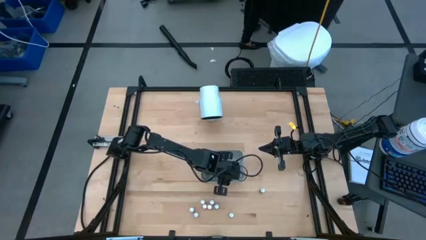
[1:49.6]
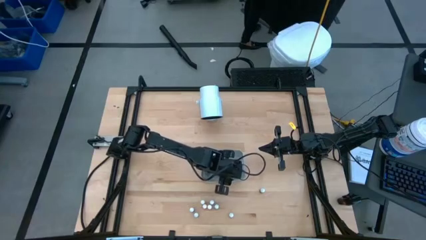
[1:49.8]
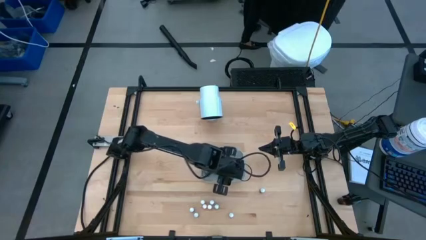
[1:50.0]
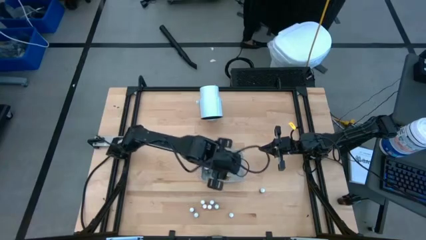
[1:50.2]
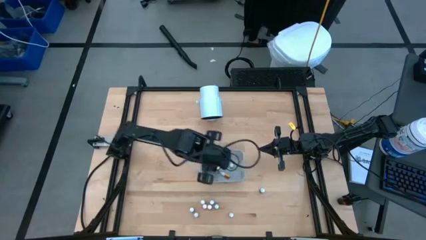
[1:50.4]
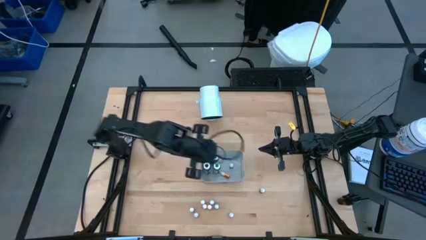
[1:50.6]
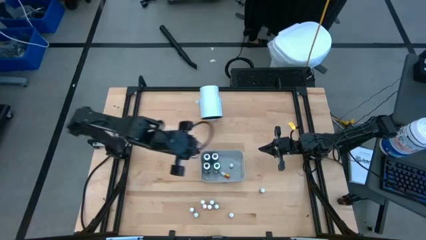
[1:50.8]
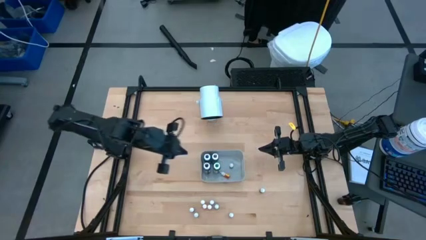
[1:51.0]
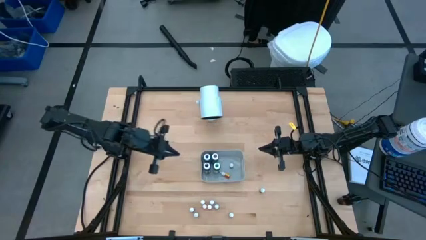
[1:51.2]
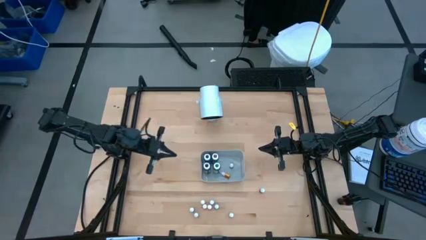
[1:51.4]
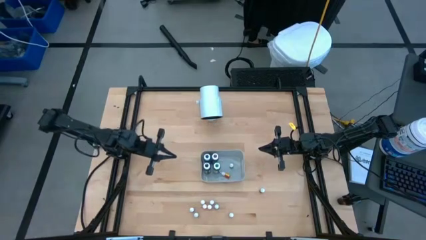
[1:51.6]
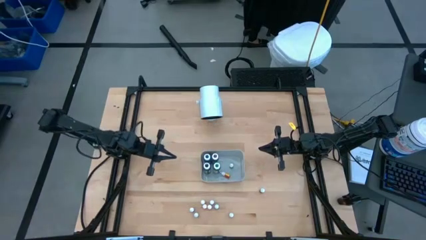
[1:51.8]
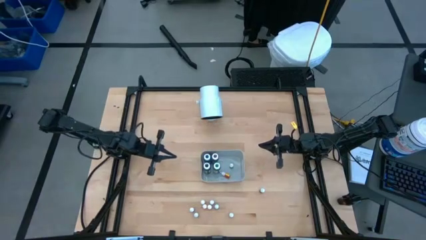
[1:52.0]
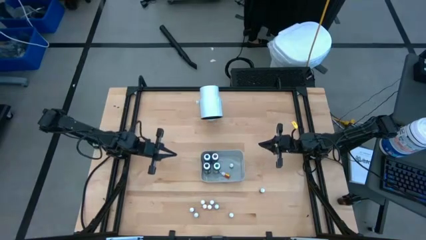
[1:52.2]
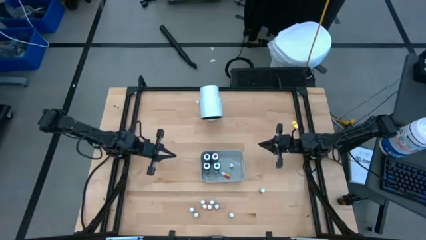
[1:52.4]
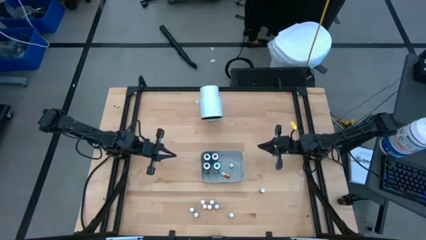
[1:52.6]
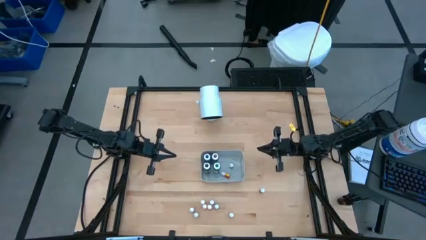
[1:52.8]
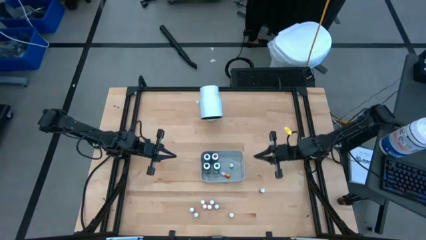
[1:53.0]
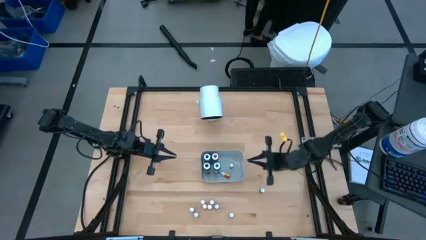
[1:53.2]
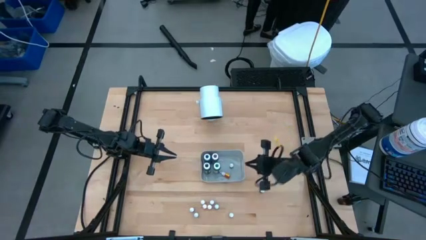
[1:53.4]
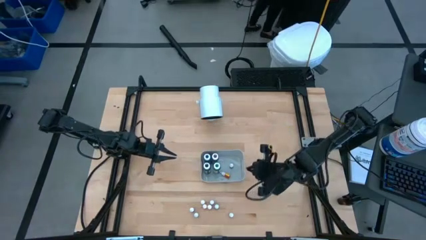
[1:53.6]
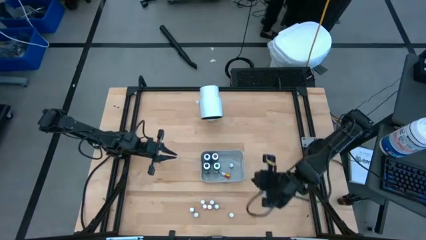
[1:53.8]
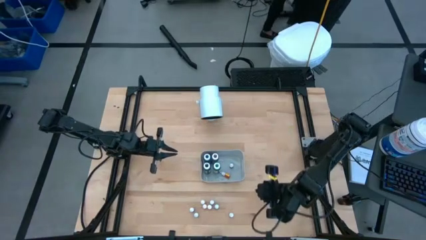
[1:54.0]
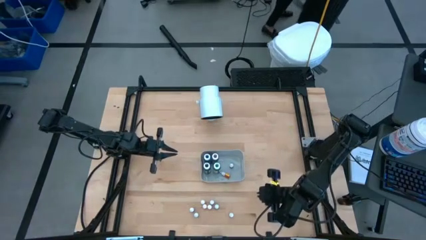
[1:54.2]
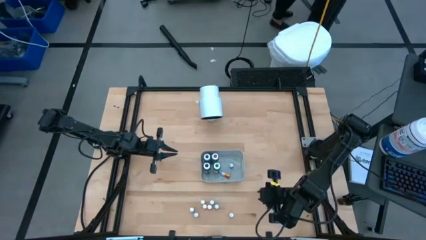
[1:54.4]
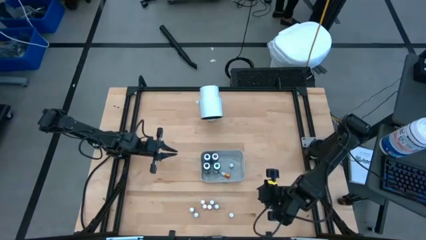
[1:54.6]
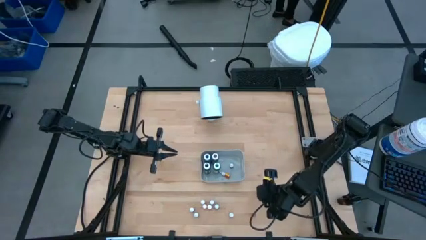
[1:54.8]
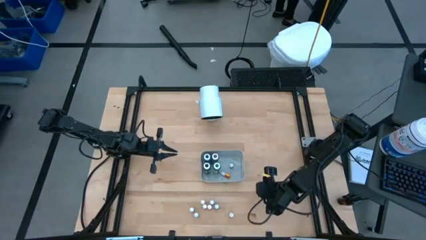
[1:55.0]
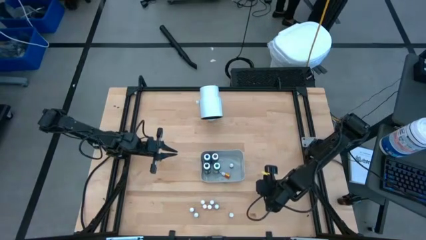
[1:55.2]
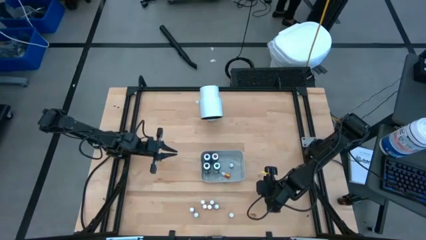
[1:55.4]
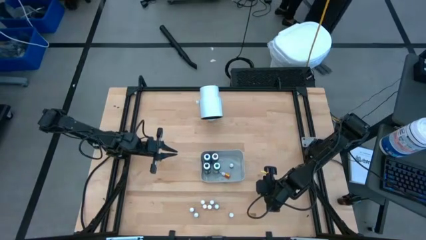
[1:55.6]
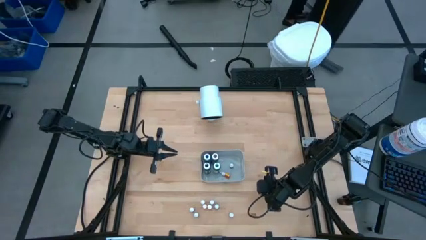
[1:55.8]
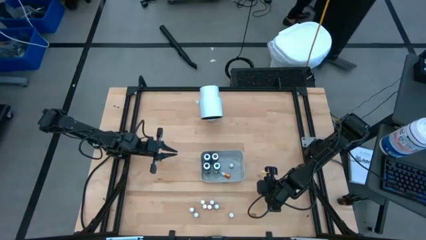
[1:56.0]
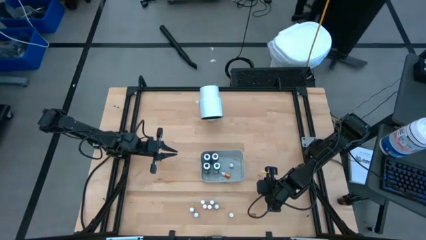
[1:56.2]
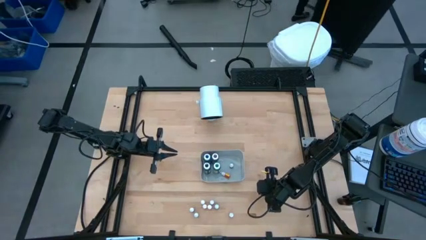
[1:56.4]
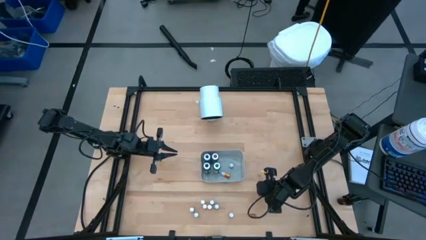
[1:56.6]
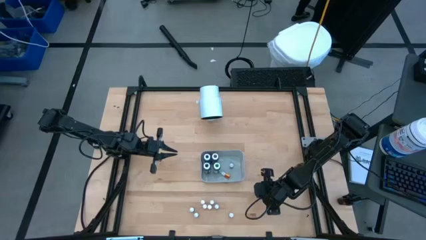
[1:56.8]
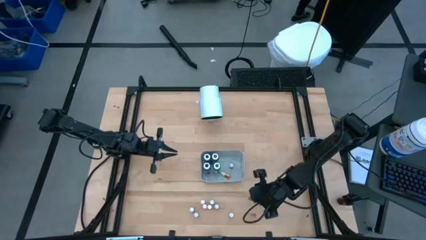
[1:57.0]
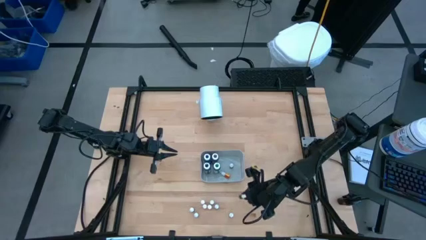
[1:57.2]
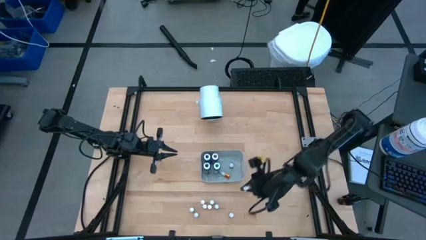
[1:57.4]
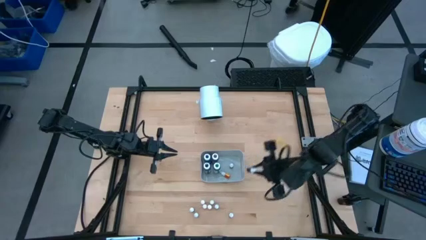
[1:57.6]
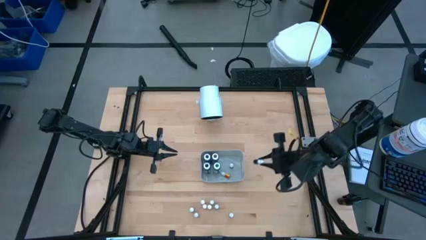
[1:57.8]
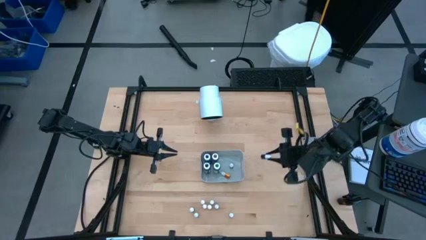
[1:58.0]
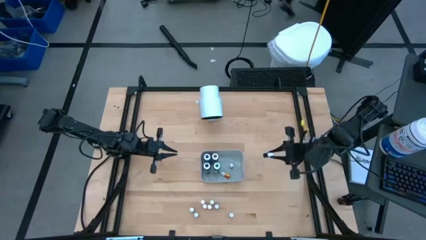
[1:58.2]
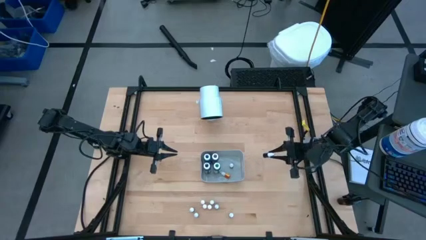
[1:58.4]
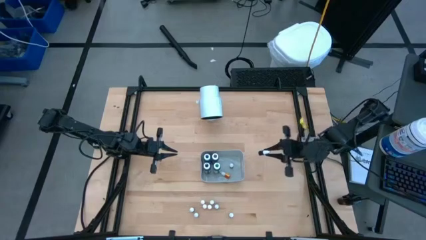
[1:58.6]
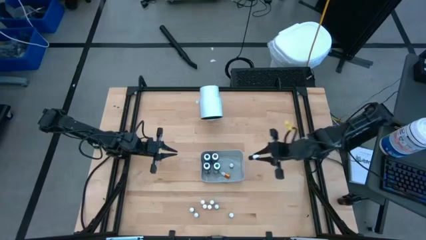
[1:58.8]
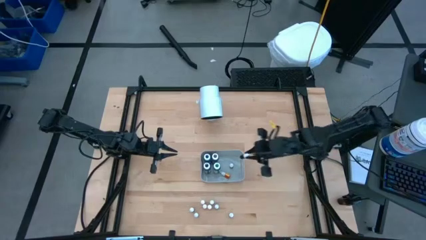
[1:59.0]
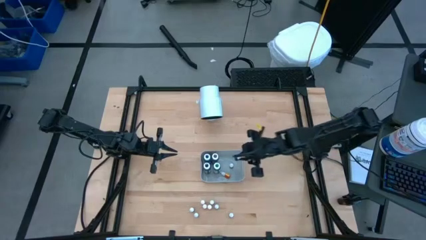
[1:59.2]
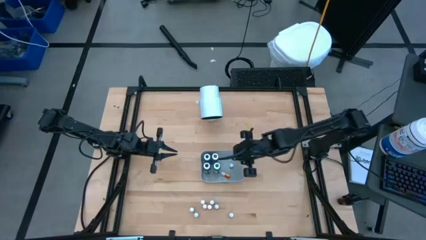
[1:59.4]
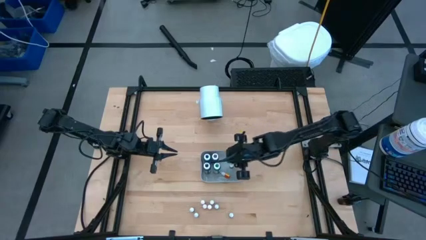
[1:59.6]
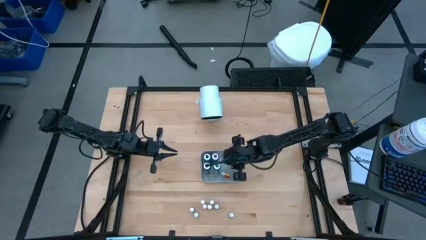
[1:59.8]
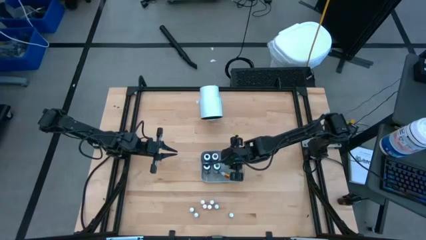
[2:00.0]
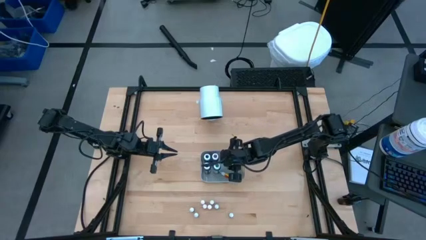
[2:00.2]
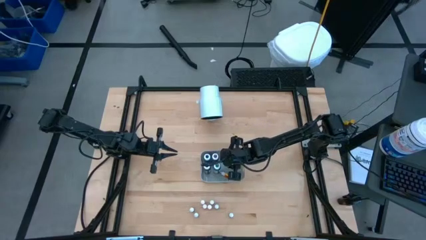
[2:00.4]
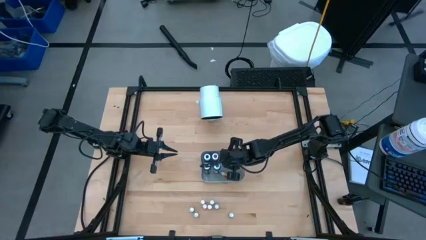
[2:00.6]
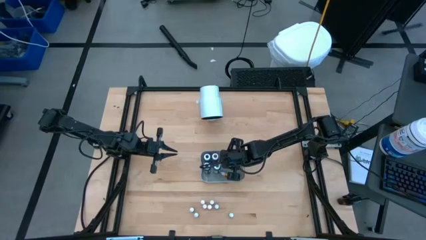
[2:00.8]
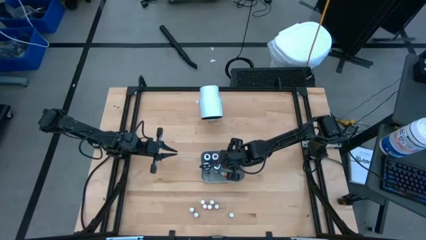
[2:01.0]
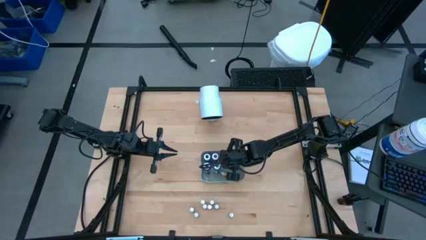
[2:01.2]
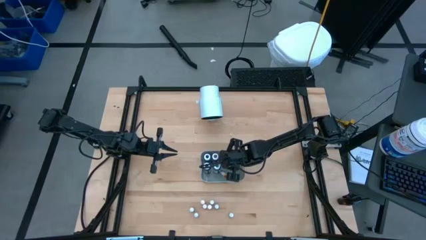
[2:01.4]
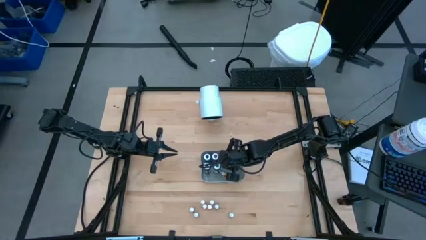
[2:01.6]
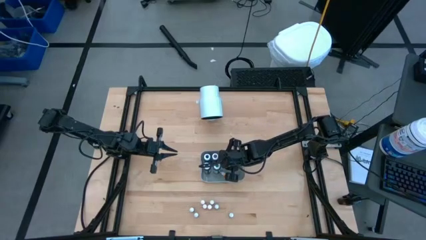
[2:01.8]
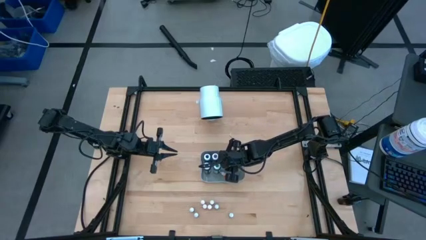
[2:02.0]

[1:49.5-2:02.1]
Task: Pick & Place food coloring
Put the red food coloring bottle into the gray bin
